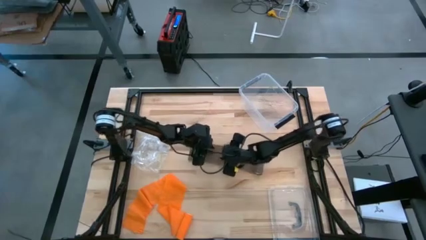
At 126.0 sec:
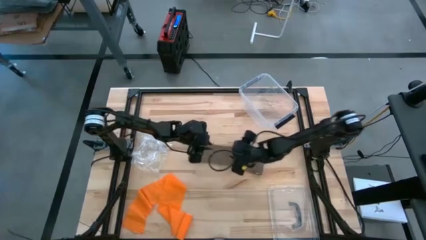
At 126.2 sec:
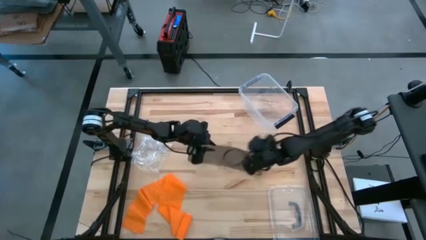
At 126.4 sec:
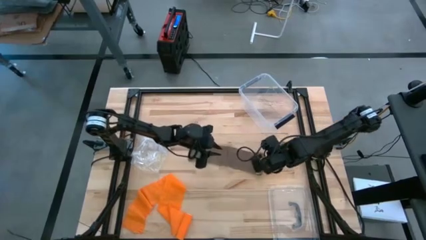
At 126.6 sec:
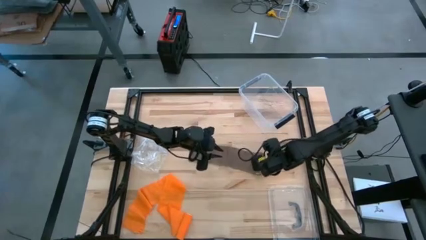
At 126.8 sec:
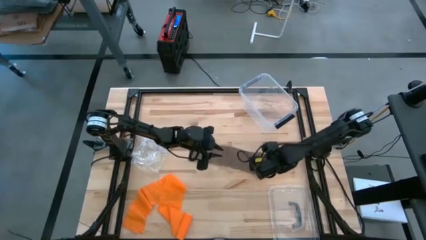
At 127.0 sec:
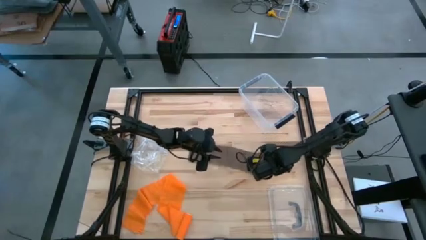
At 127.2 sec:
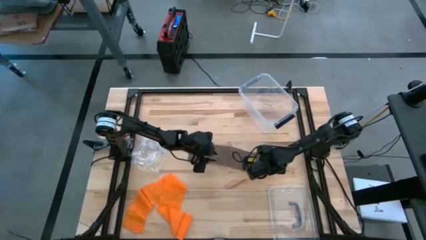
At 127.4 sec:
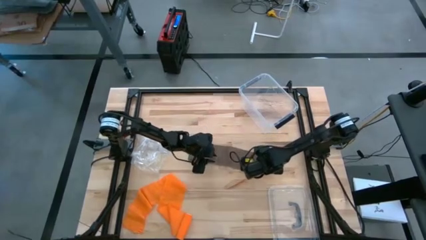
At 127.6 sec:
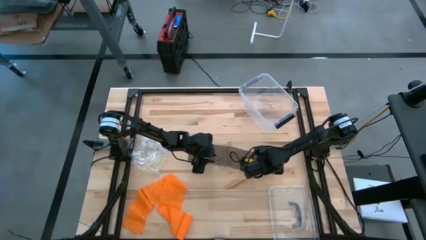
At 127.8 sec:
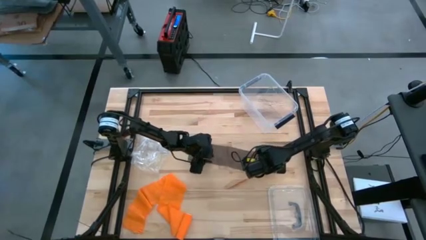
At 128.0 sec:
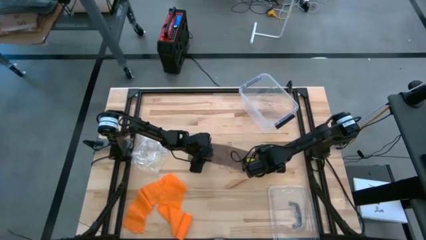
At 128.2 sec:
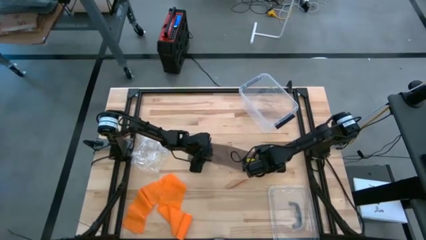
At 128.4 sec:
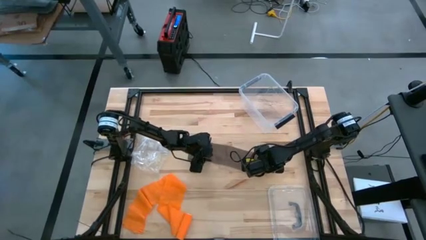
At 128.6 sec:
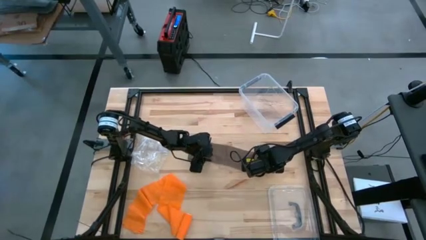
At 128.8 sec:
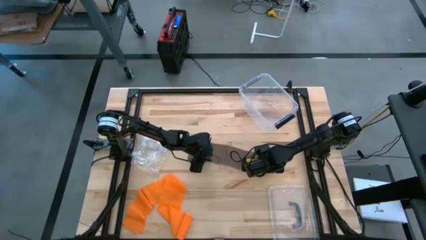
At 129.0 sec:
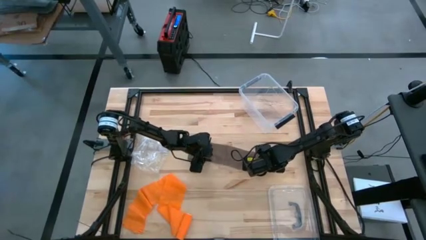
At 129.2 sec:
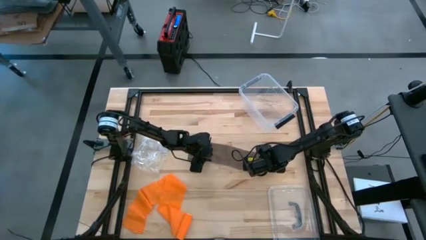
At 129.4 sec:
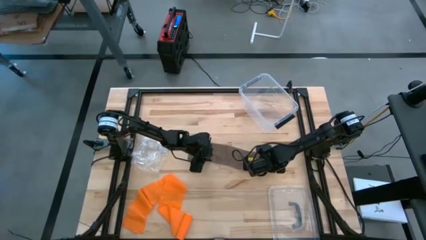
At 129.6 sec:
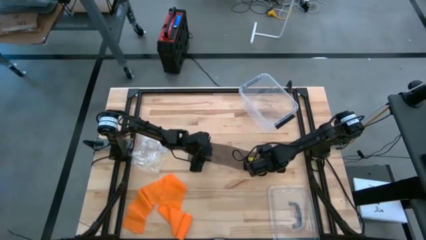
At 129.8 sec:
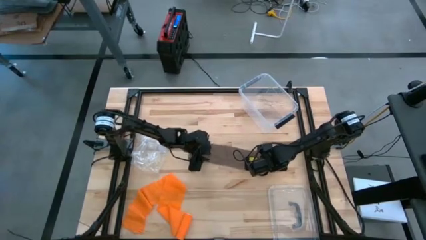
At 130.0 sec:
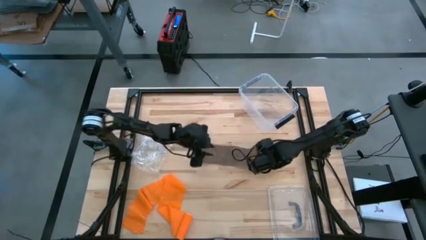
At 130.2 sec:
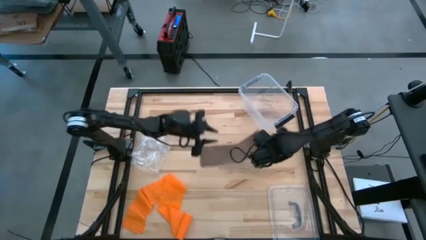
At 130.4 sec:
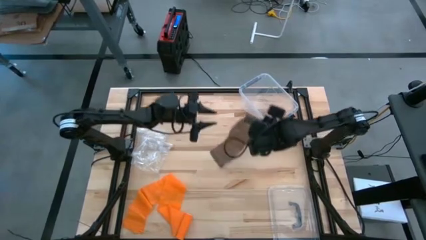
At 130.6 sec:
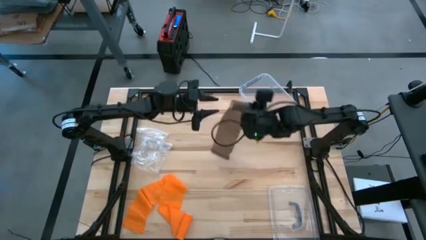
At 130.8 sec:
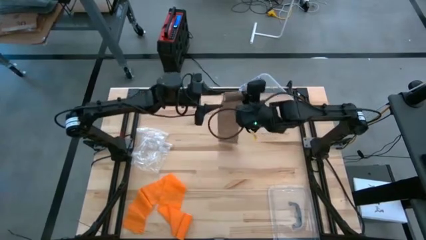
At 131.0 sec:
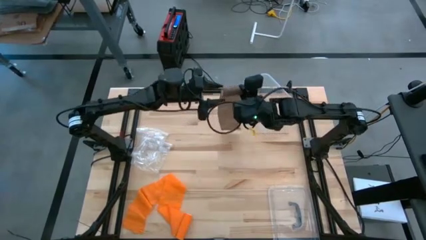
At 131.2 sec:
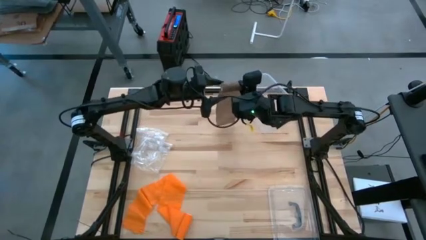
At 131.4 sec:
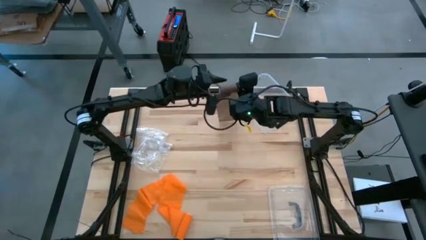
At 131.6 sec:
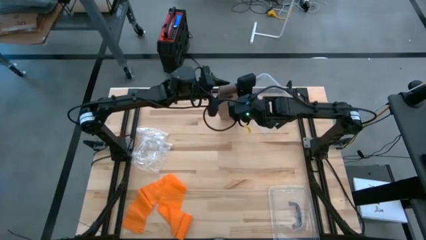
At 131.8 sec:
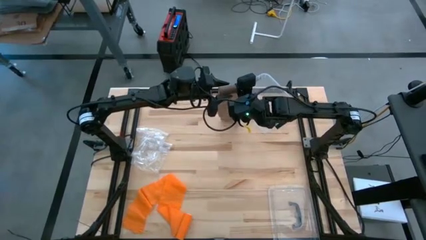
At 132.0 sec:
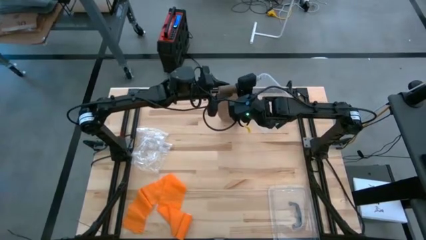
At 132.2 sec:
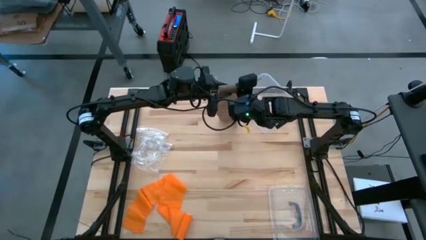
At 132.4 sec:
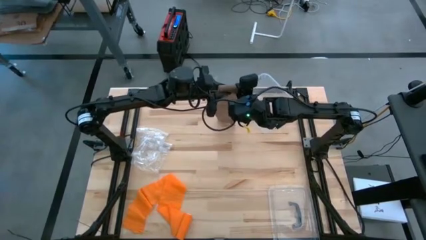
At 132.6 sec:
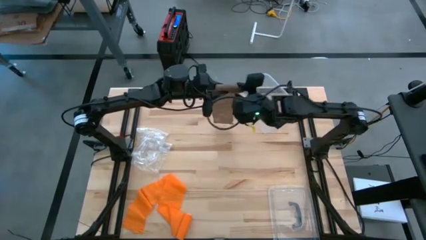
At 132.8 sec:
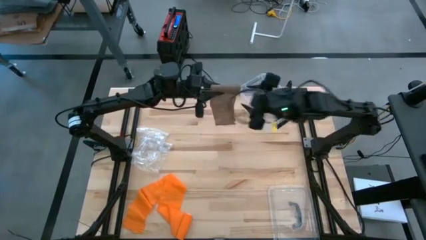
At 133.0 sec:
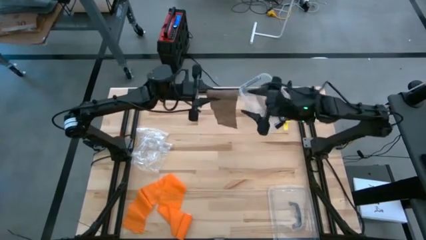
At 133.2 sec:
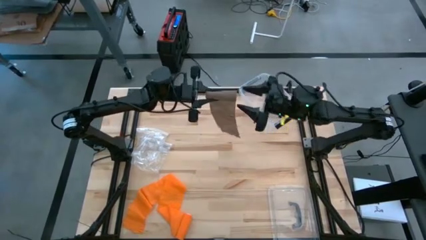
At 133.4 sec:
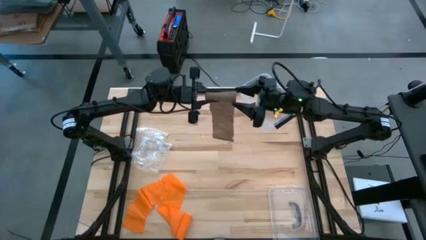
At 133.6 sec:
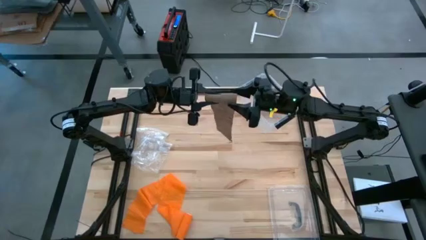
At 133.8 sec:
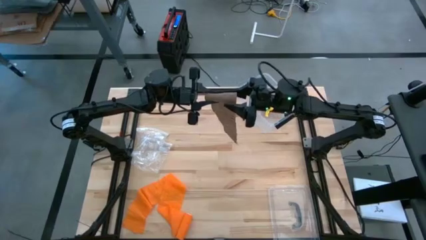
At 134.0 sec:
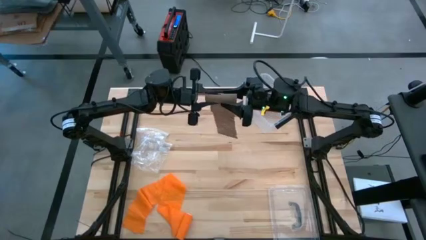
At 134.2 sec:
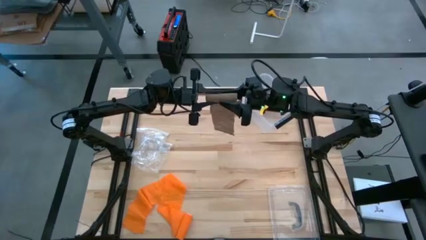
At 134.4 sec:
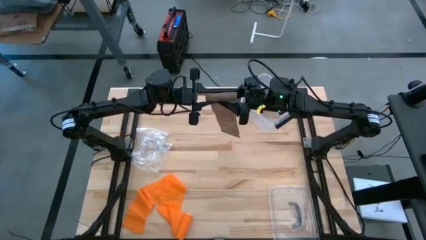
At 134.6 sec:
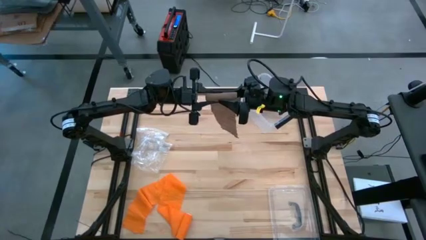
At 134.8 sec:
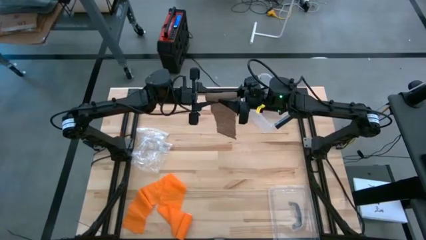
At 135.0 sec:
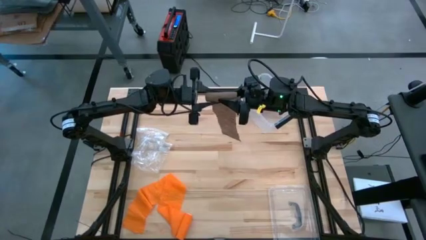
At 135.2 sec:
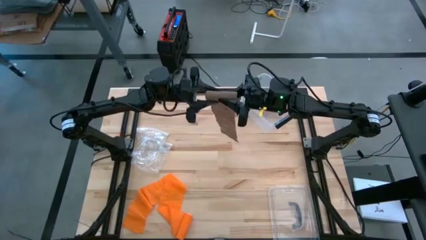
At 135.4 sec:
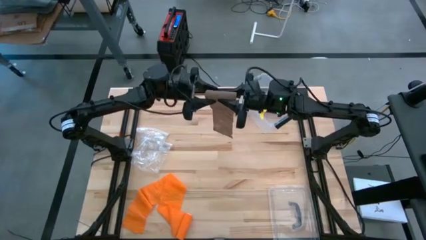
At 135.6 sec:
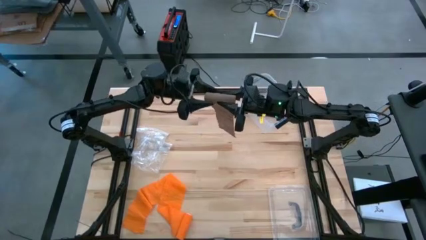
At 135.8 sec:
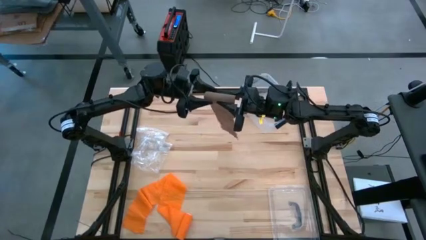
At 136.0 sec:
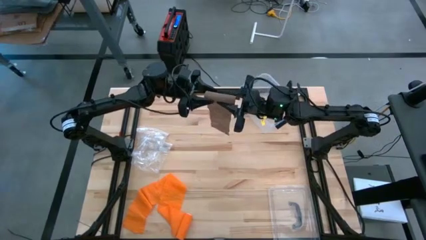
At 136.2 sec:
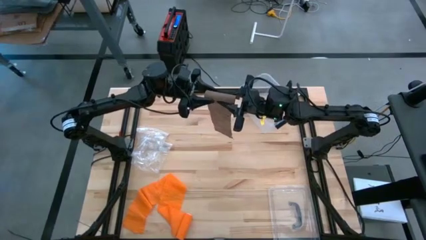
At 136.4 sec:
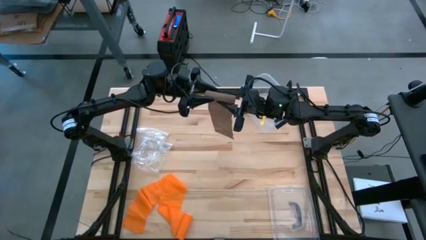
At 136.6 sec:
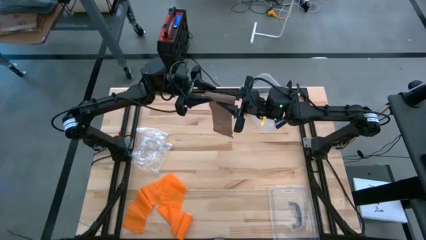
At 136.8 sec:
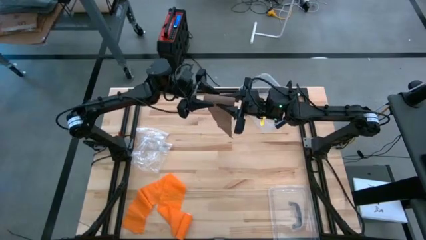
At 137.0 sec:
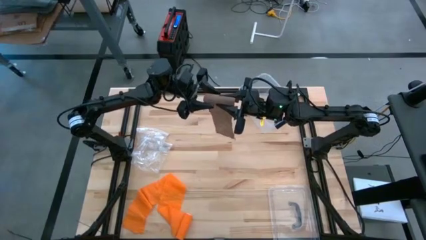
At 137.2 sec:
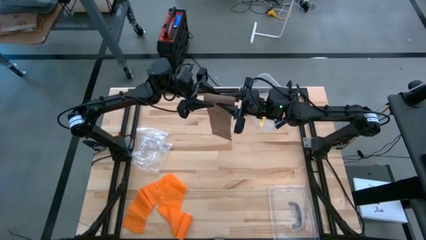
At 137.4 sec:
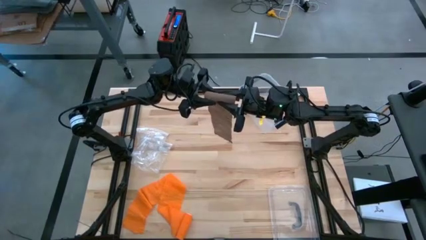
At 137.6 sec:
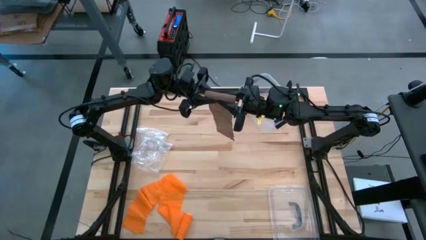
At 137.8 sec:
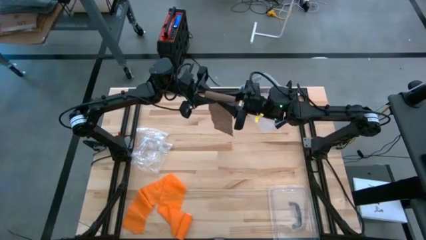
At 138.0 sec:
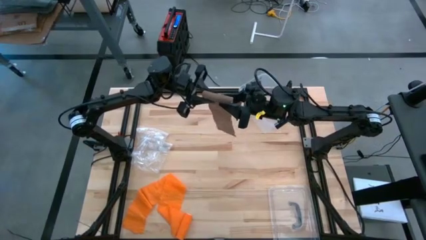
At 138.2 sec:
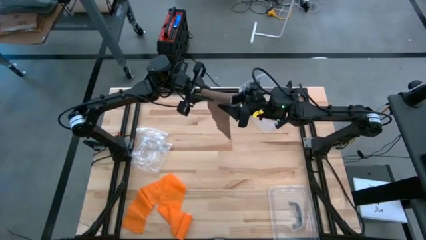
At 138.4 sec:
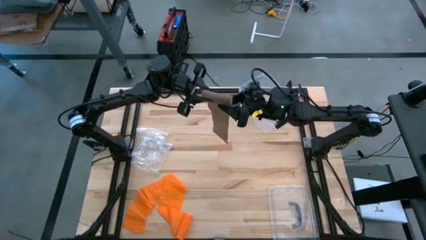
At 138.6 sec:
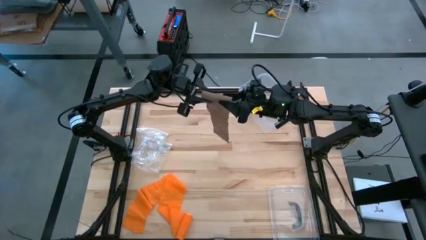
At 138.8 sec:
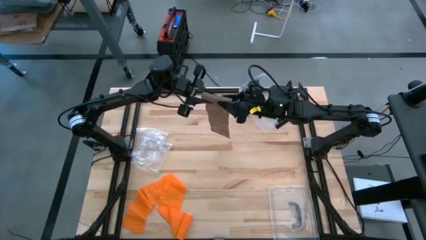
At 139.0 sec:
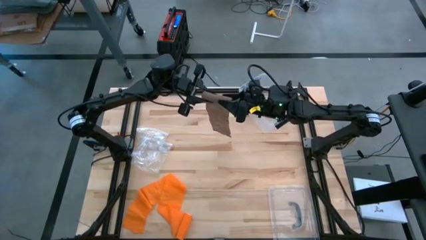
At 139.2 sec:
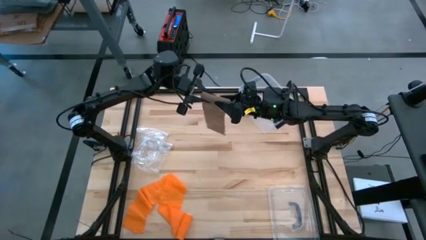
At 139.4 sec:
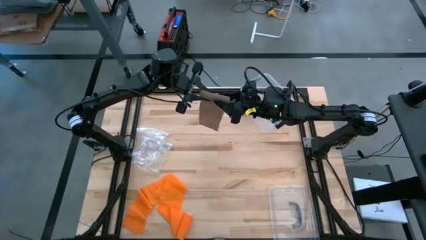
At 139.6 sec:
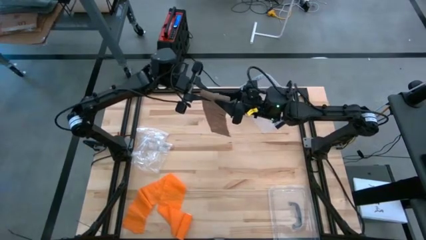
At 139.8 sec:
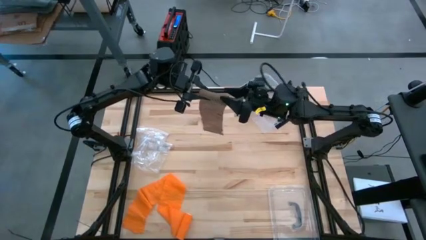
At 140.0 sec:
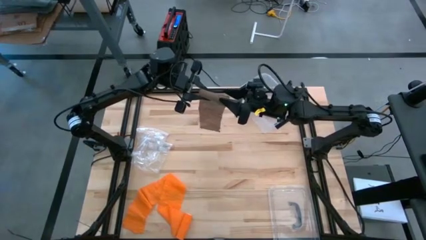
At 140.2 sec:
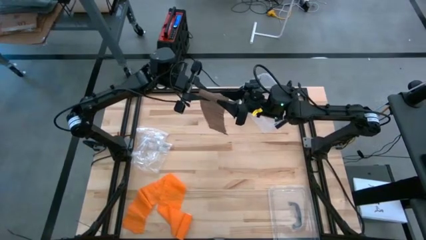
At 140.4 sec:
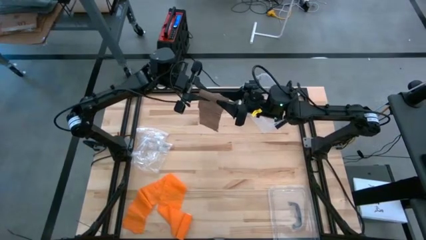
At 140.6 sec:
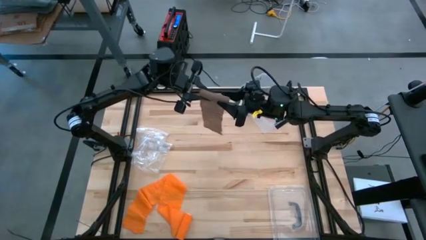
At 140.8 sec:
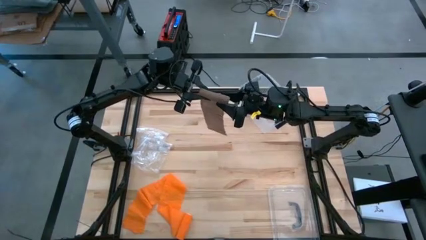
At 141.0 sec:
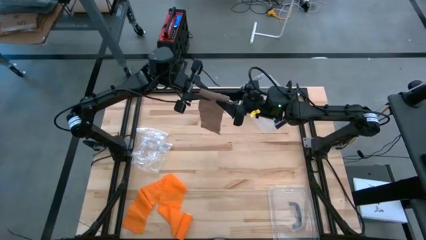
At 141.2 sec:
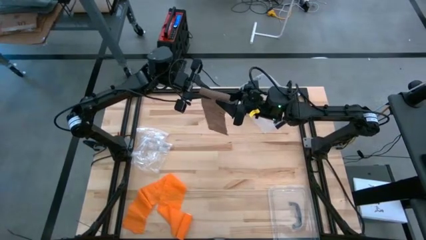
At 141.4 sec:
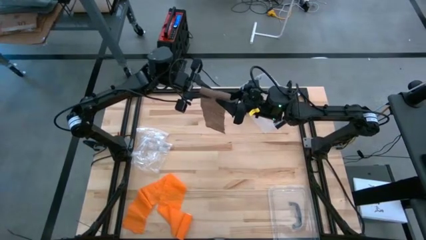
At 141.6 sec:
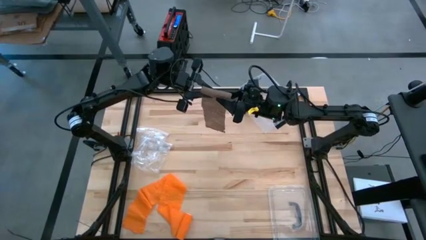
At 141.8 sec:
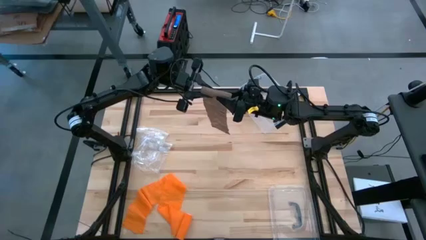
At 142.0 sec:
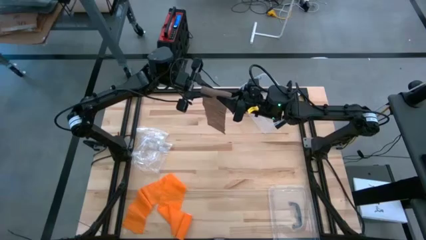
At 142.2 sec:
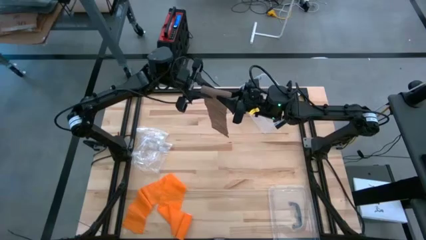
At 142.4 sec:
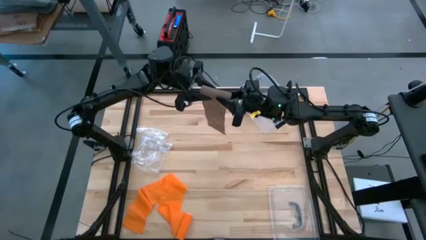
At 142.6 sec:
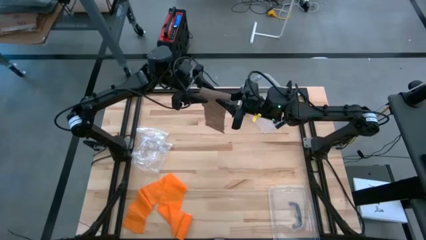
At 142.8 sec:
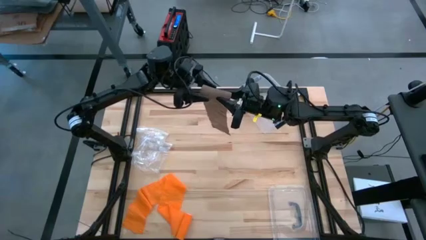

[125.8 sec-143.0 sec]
Task: Roll bandage
Roll the brown bandage
